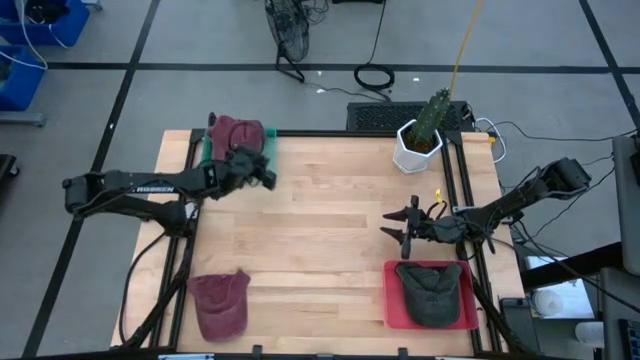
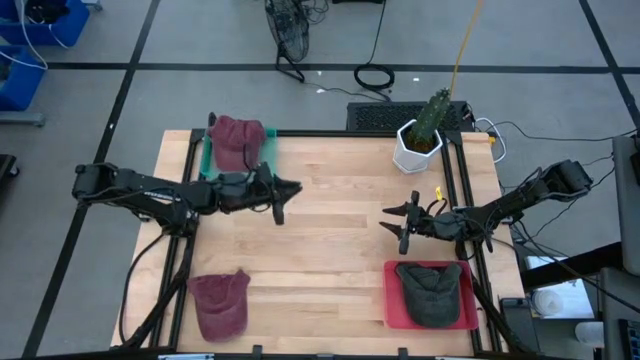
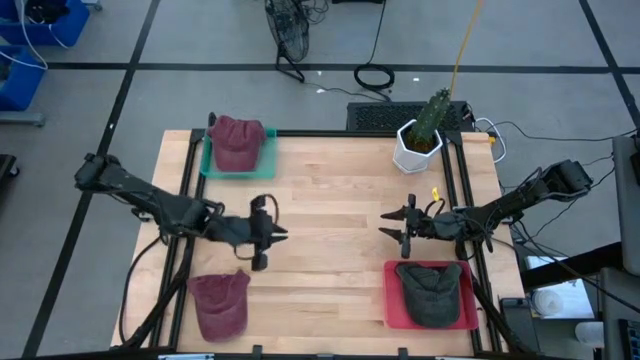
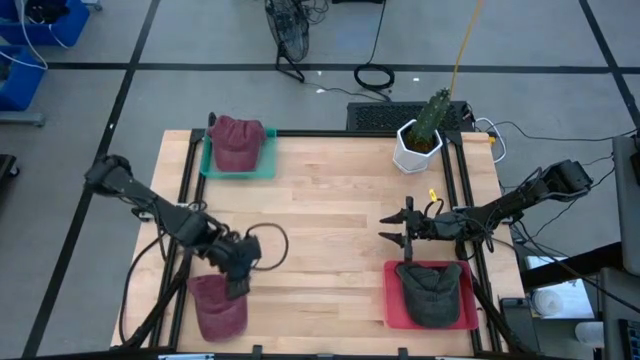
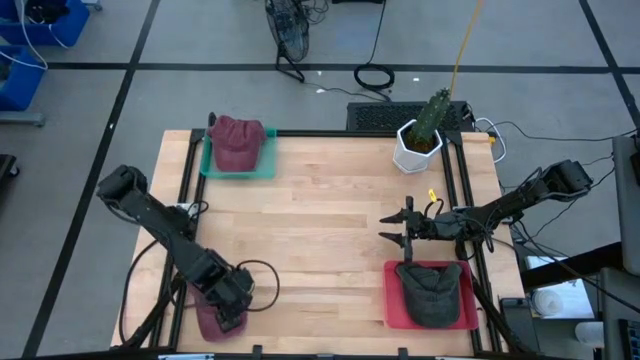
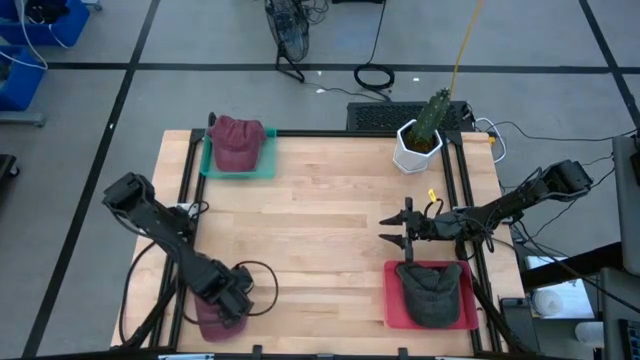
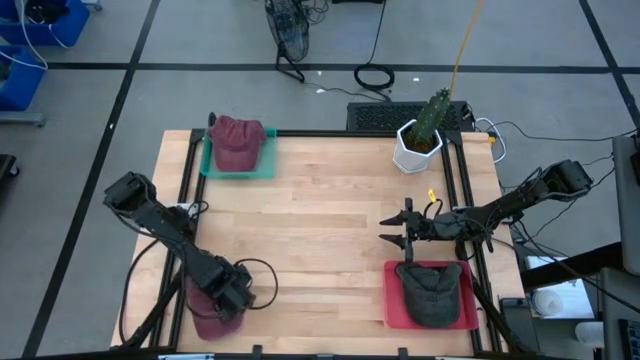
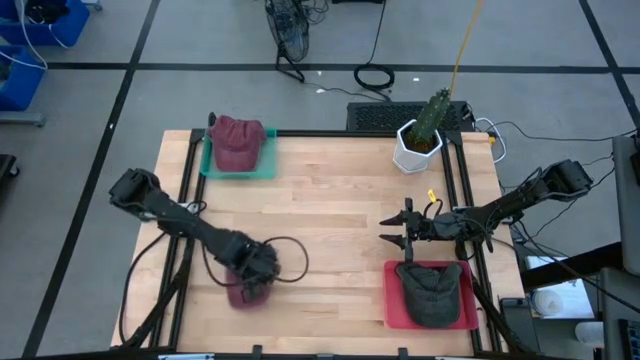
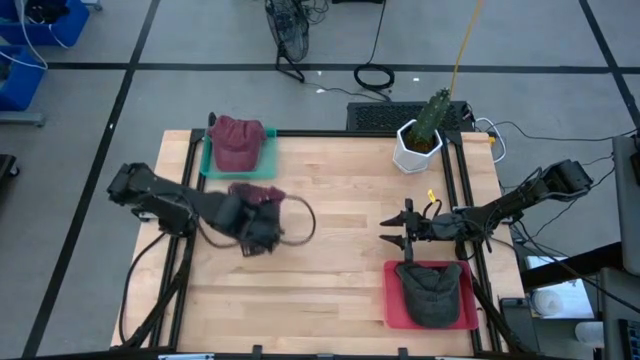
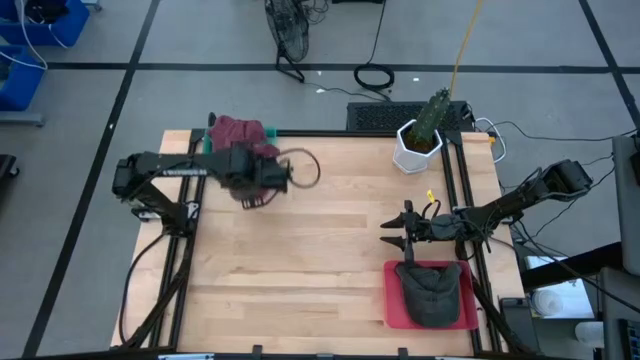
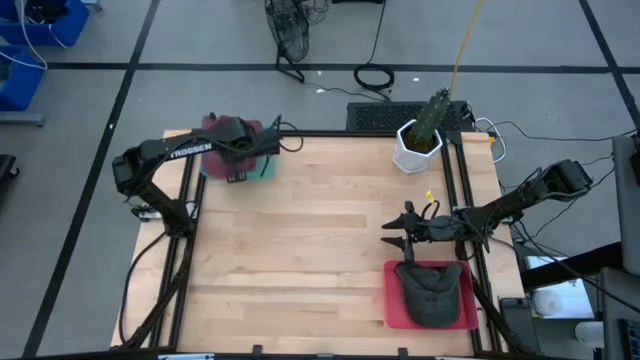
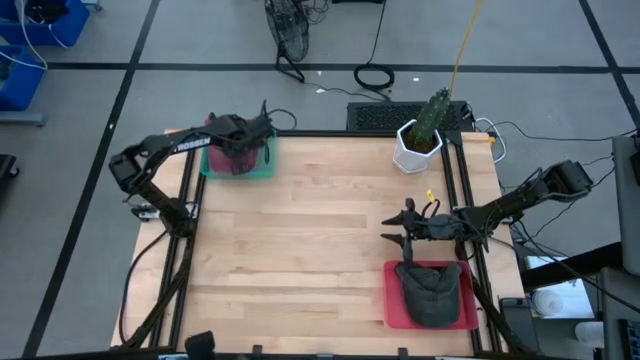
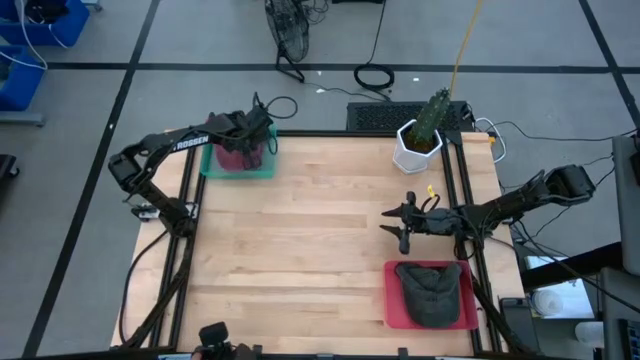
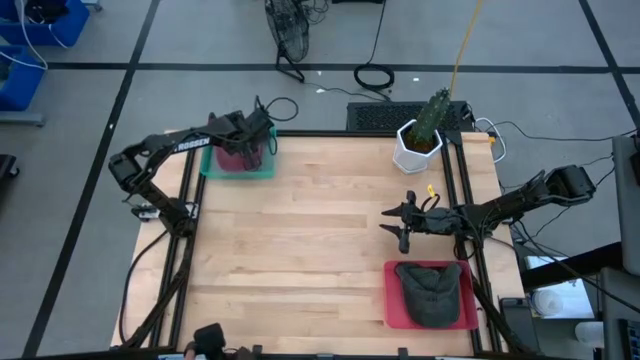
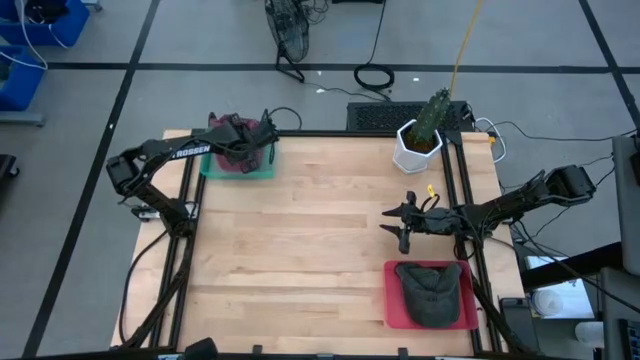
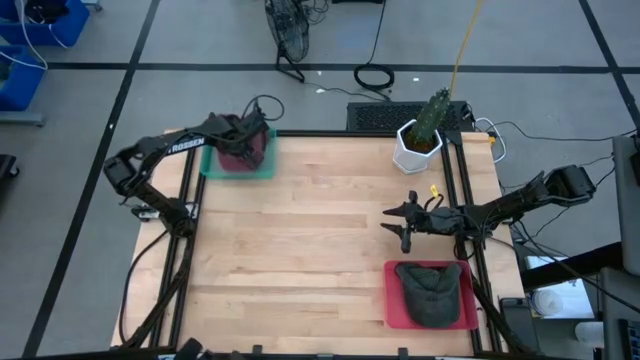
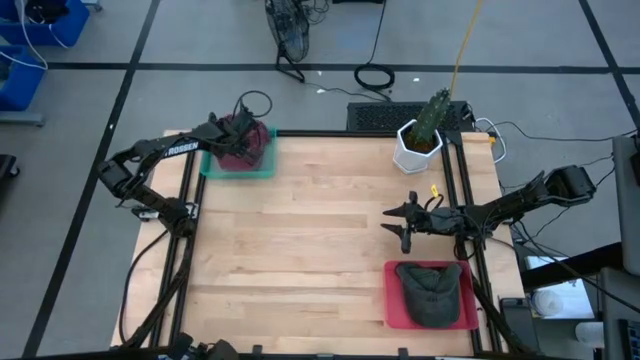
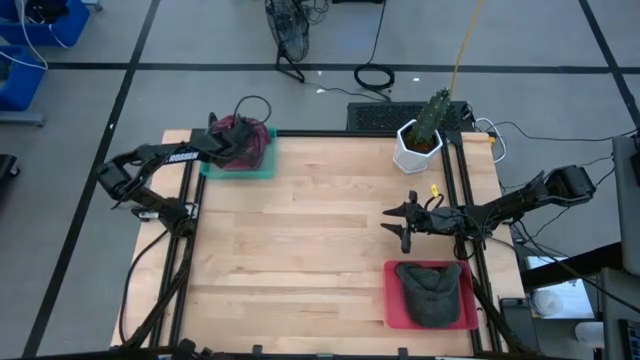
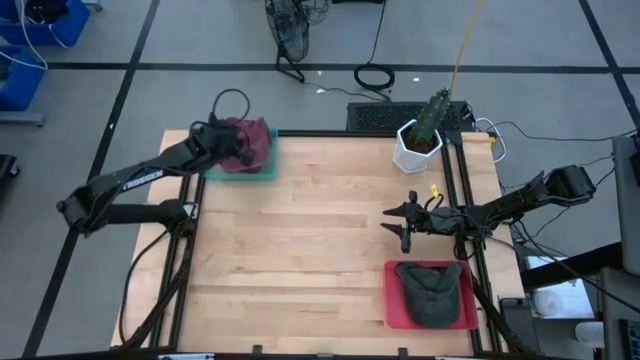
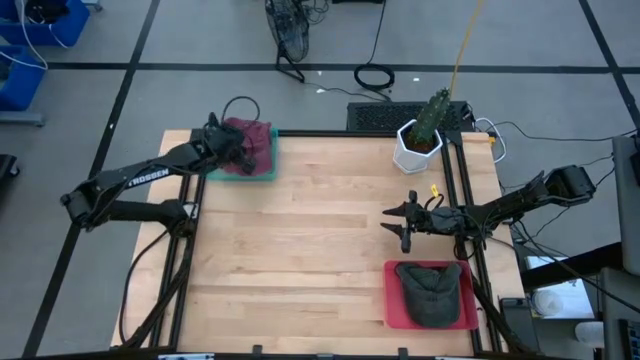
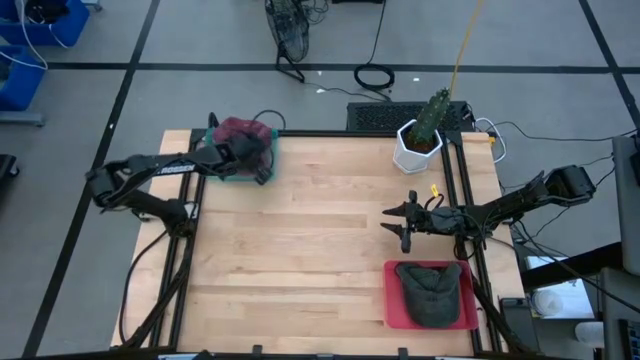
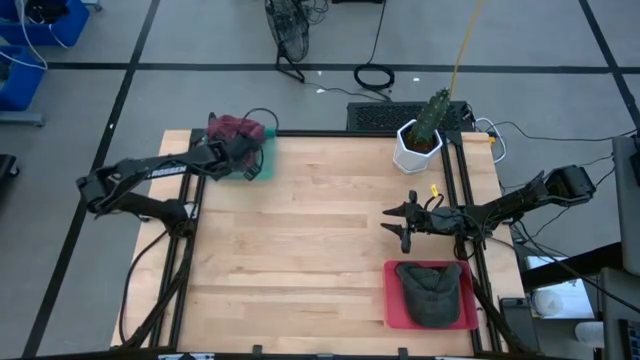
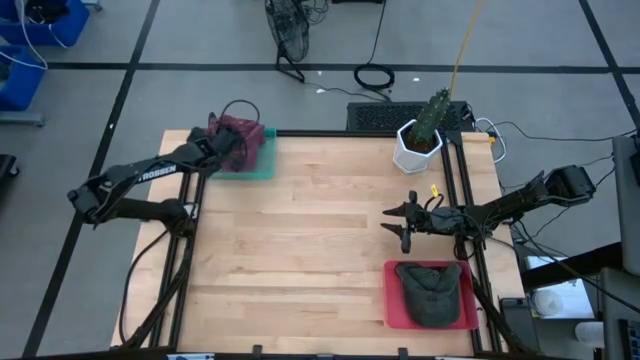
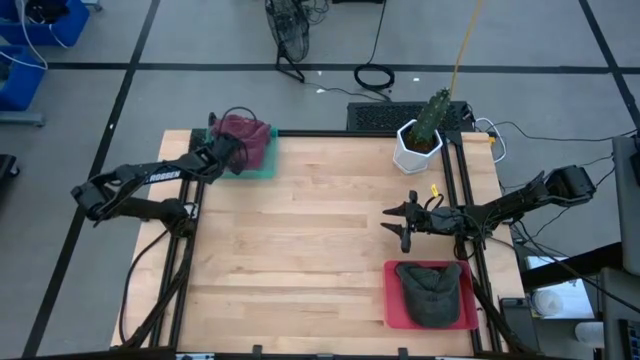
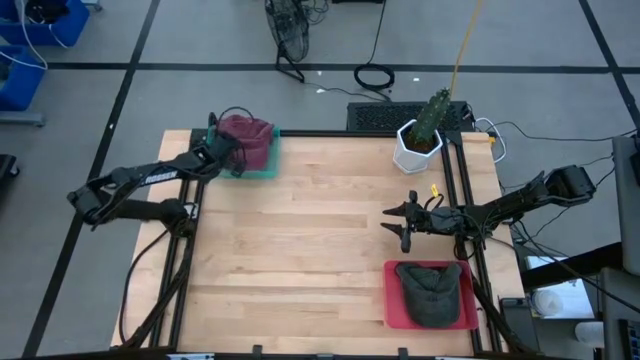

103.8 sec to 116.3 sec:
Task: Pick & Place hat
Put the maroon cap into the green bin

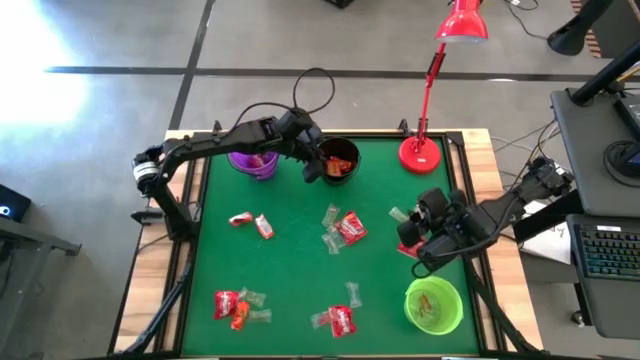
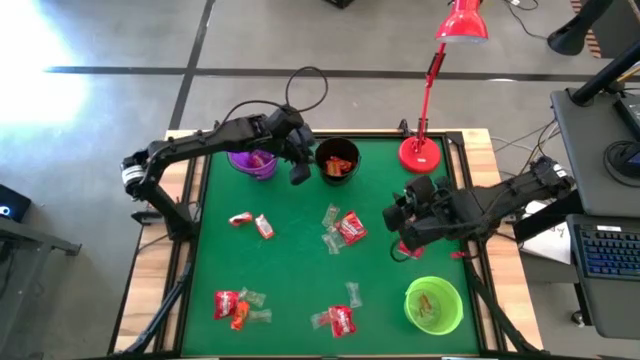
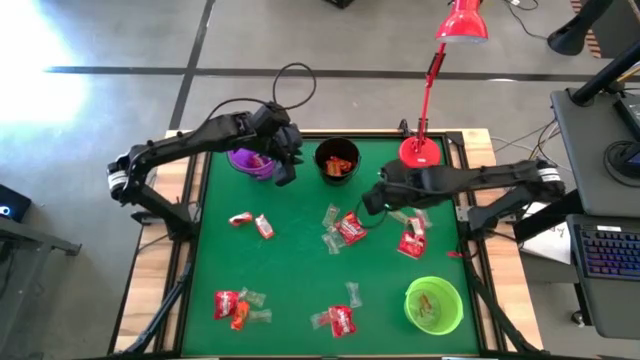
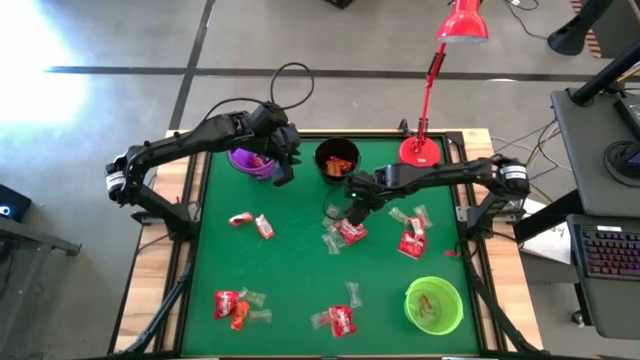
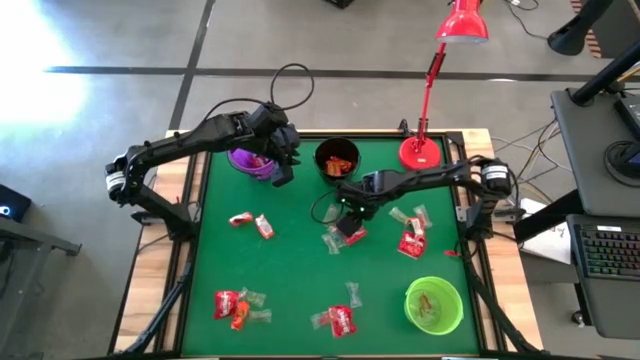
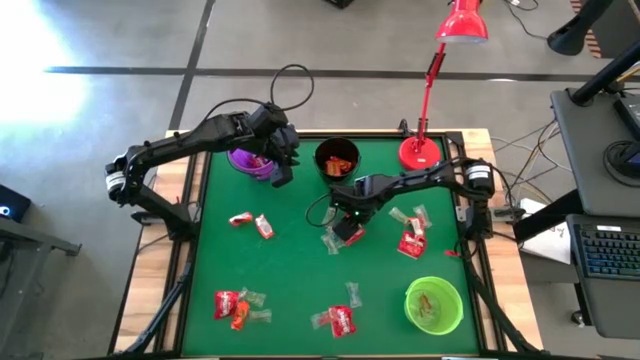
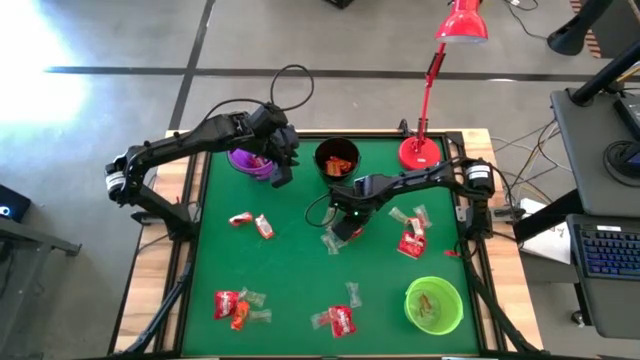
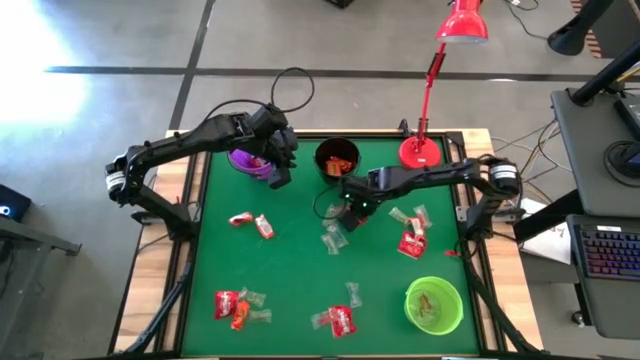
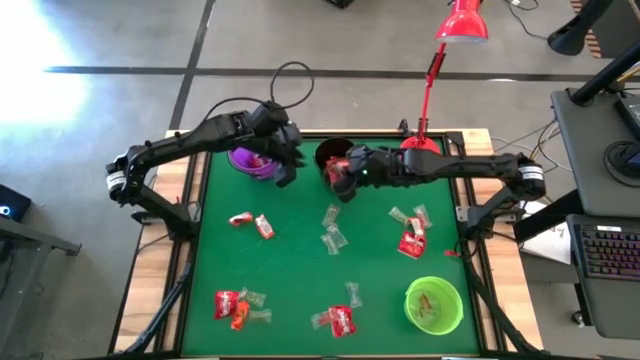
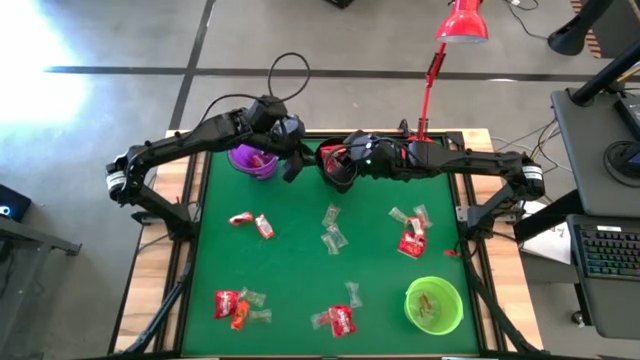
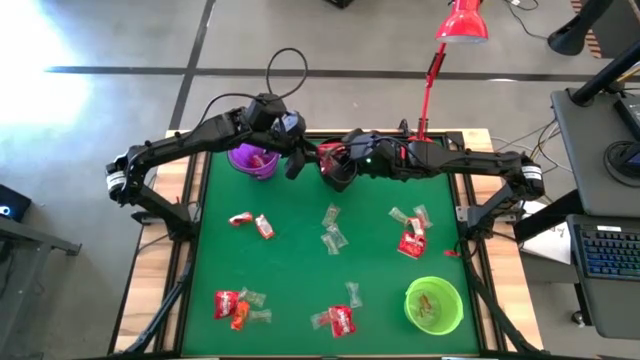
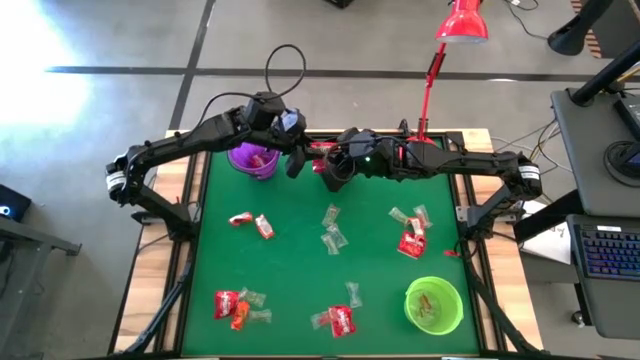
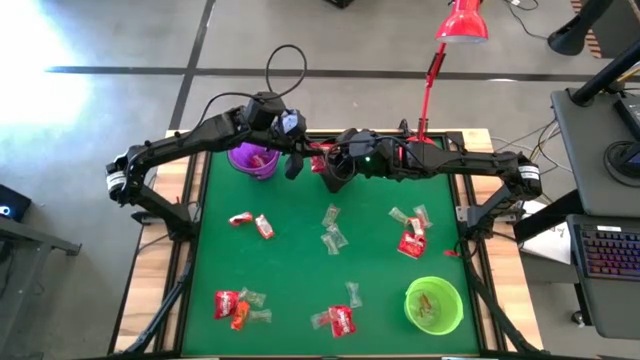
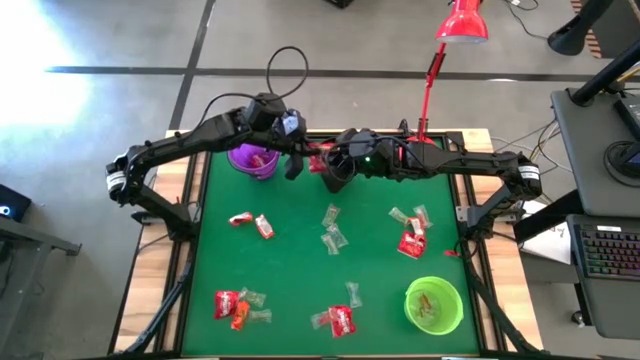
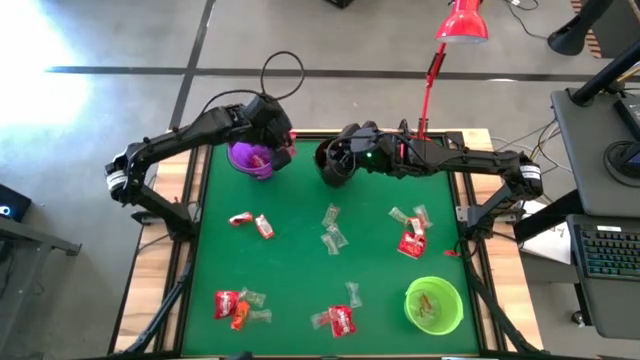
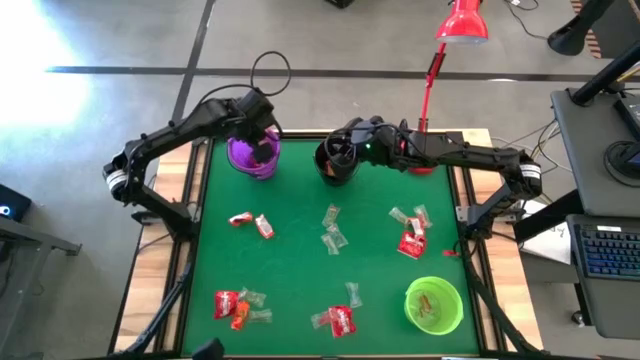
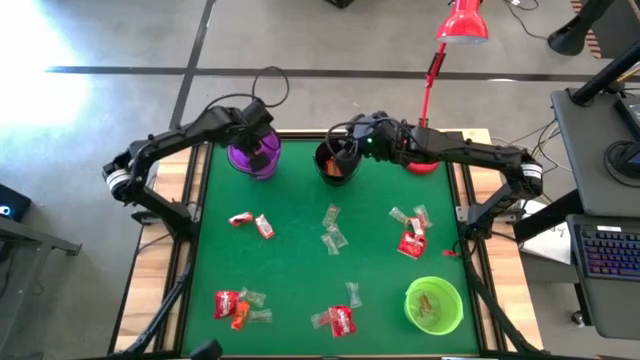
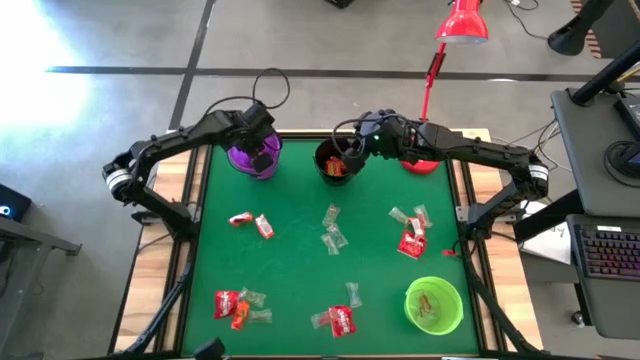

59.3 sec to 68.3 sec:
Task: Sort candy
Put the red candy into the black bucket
